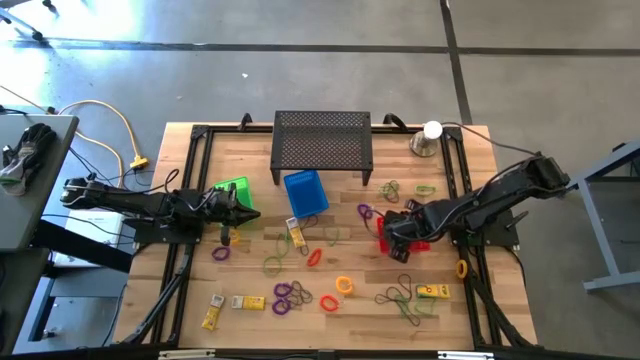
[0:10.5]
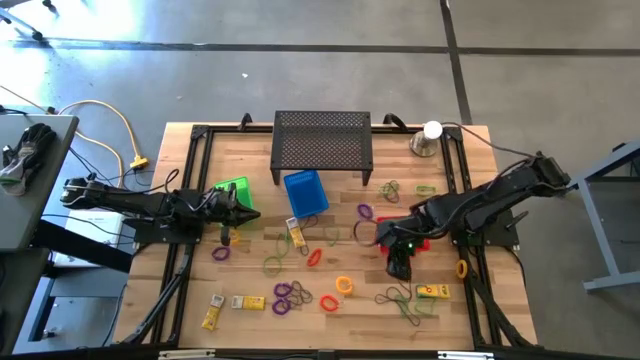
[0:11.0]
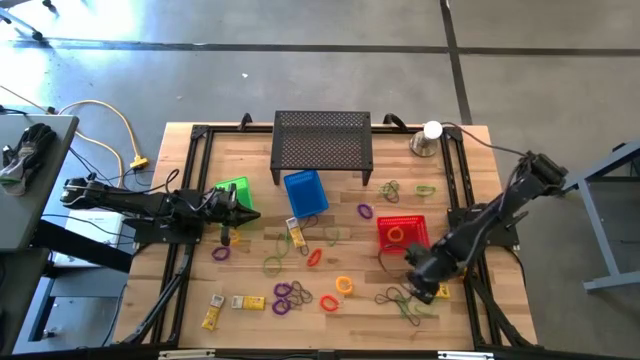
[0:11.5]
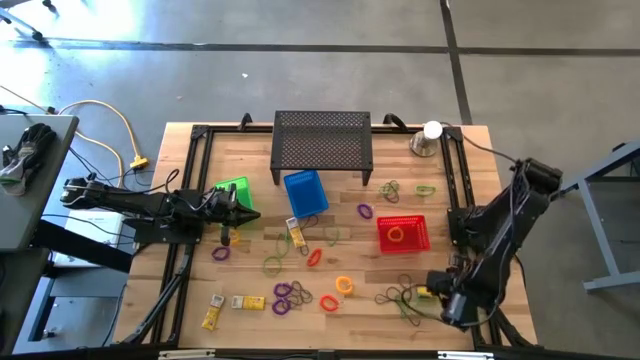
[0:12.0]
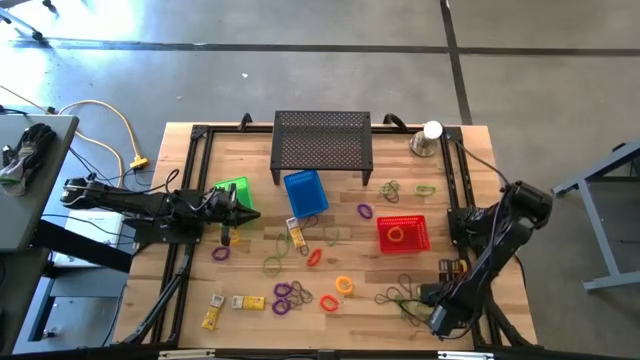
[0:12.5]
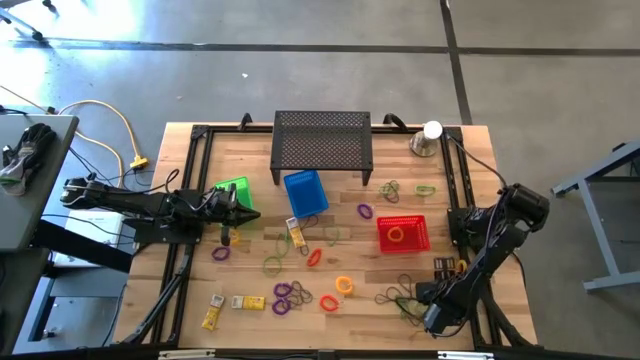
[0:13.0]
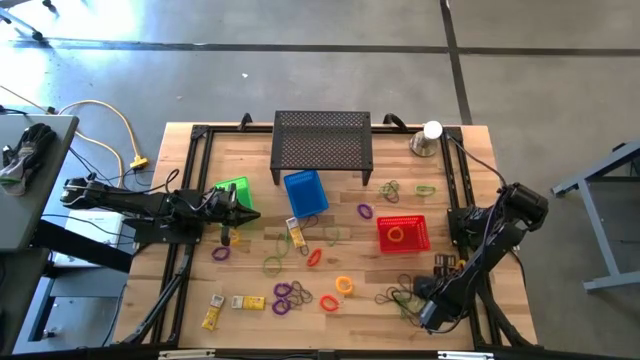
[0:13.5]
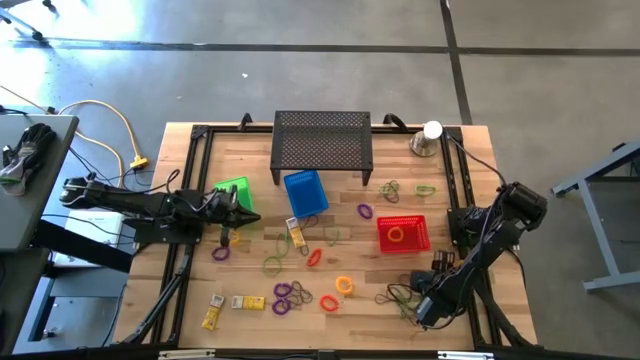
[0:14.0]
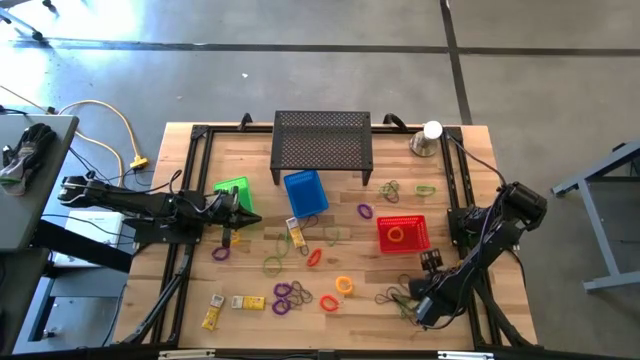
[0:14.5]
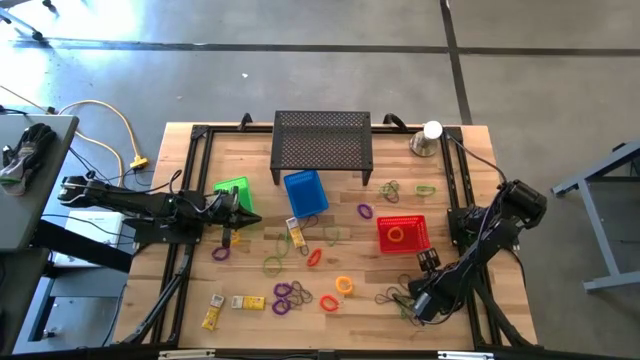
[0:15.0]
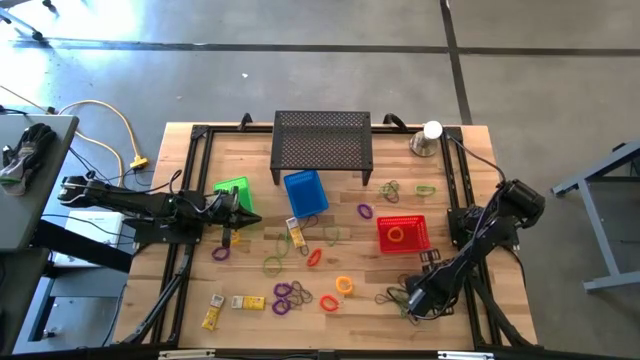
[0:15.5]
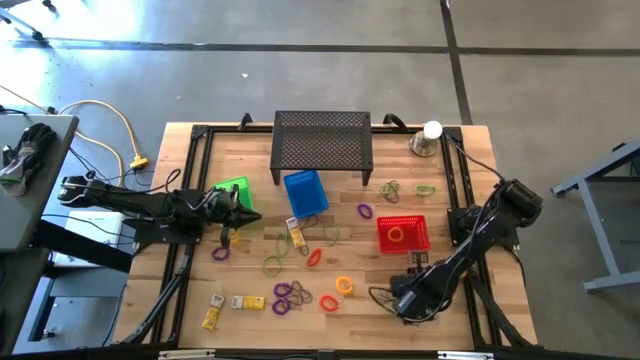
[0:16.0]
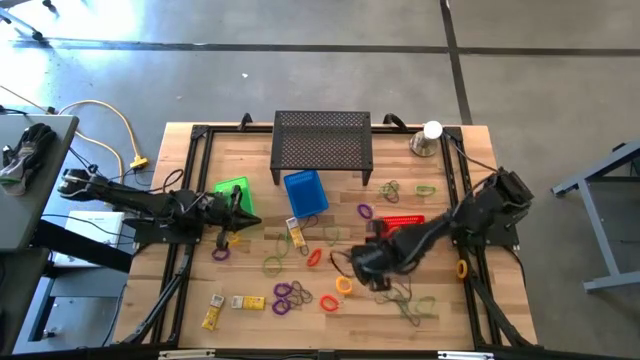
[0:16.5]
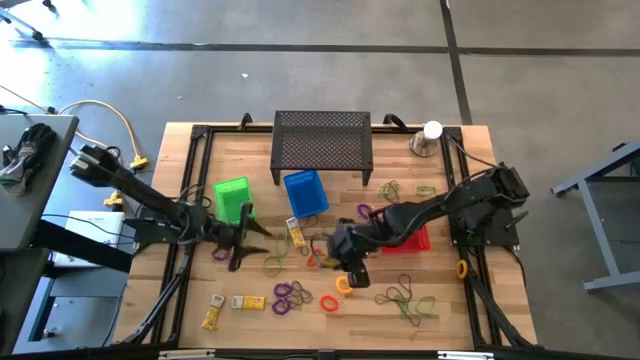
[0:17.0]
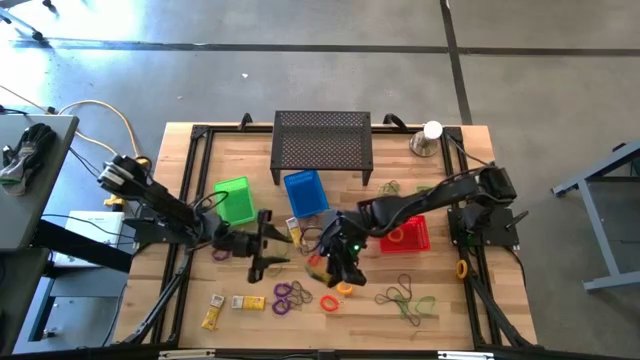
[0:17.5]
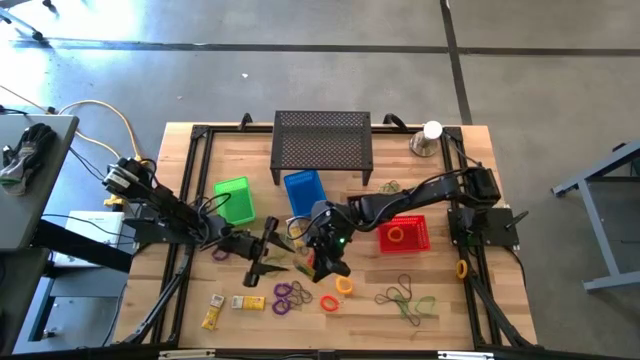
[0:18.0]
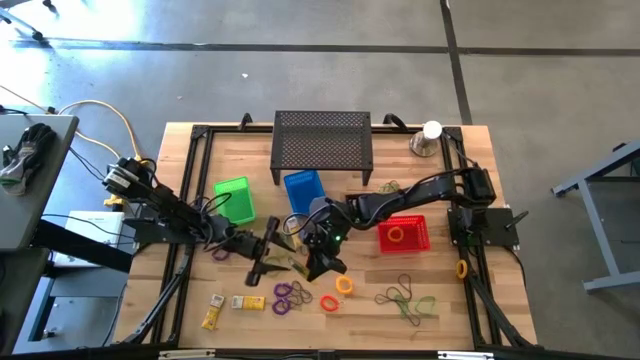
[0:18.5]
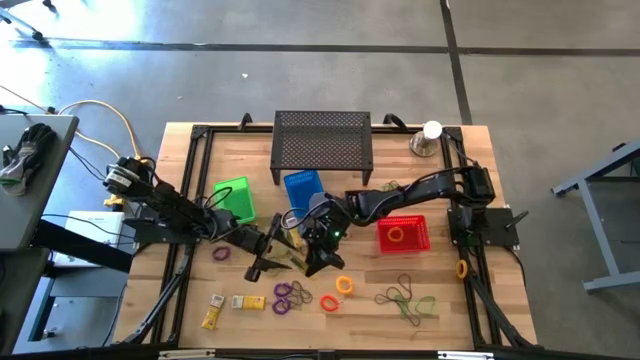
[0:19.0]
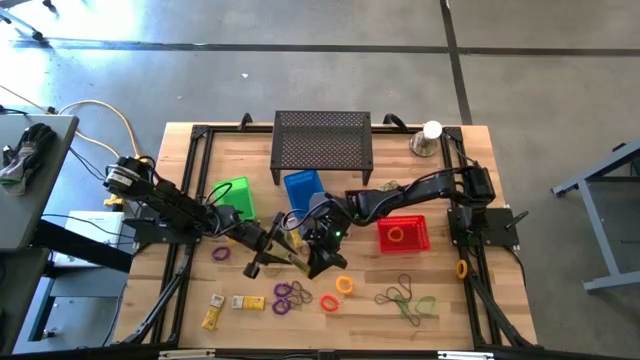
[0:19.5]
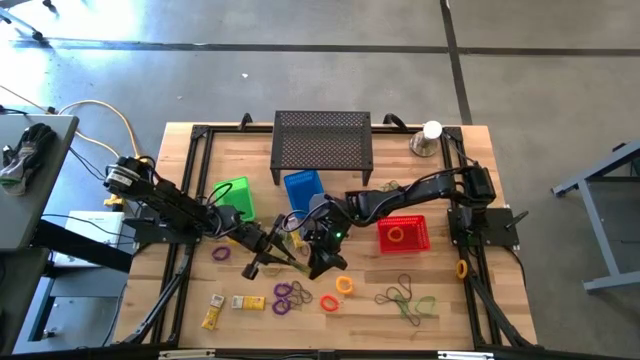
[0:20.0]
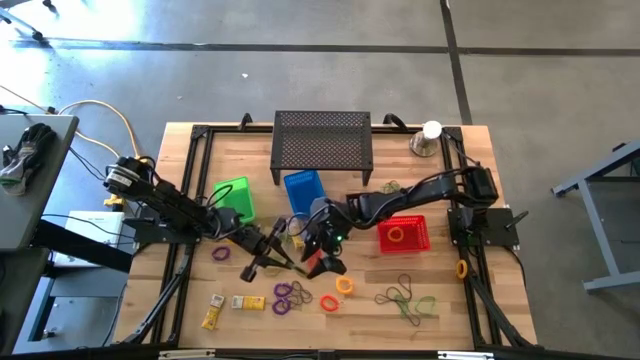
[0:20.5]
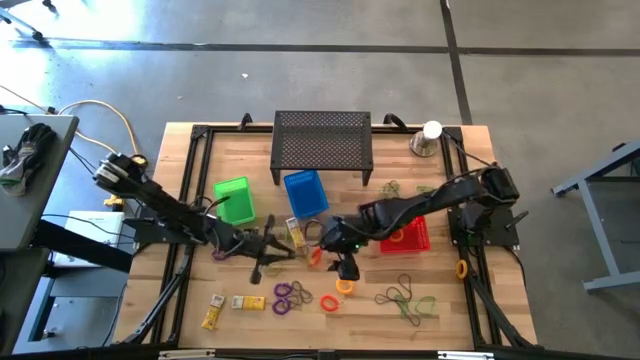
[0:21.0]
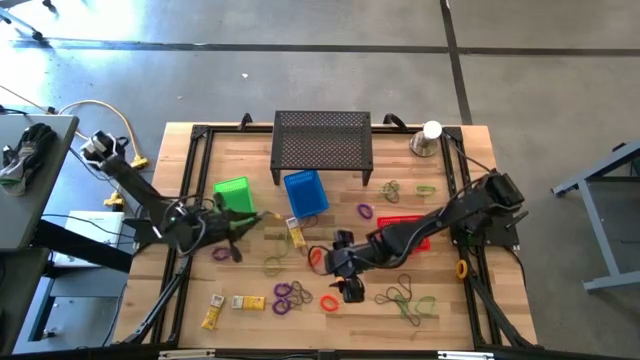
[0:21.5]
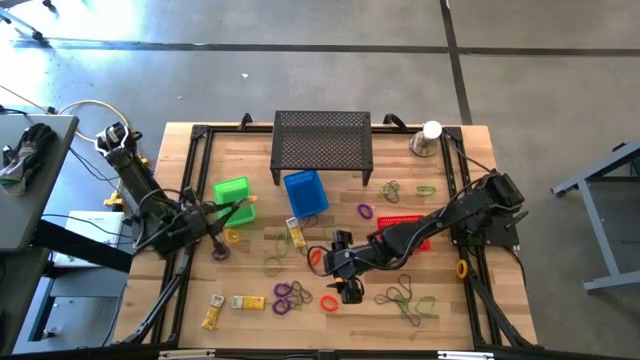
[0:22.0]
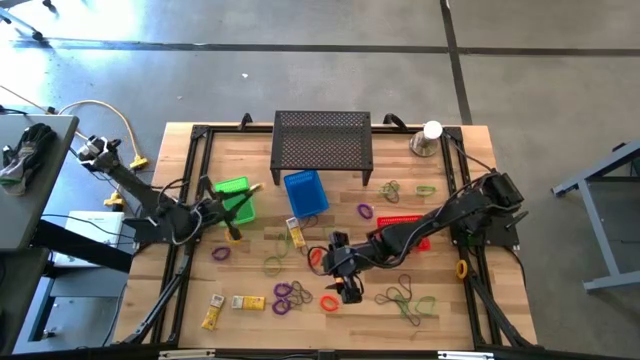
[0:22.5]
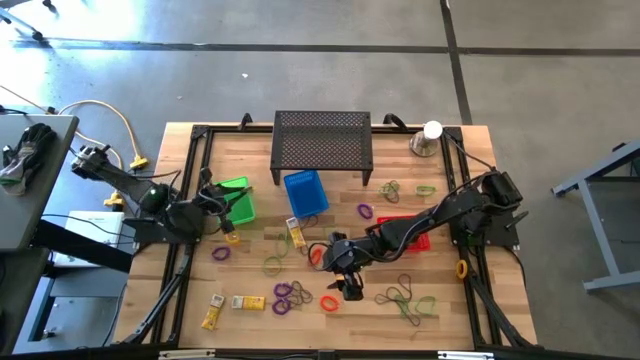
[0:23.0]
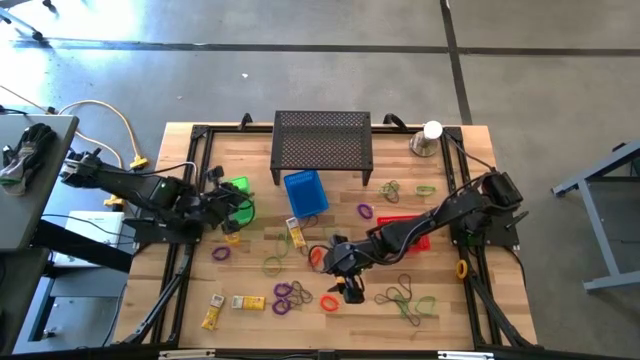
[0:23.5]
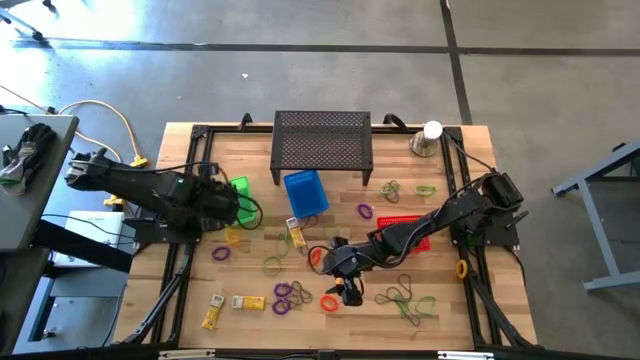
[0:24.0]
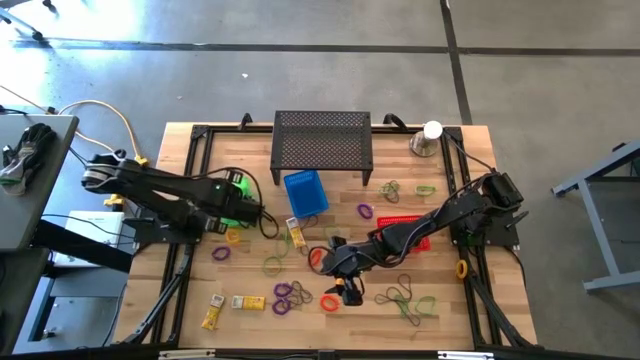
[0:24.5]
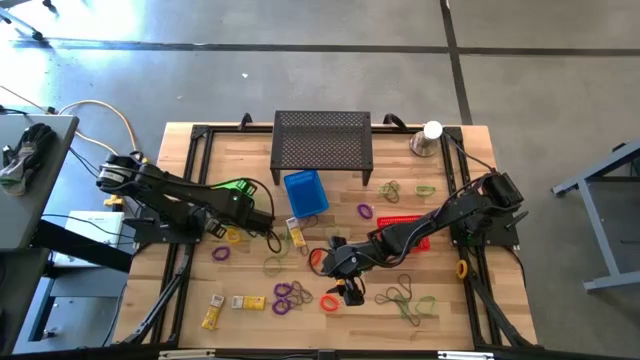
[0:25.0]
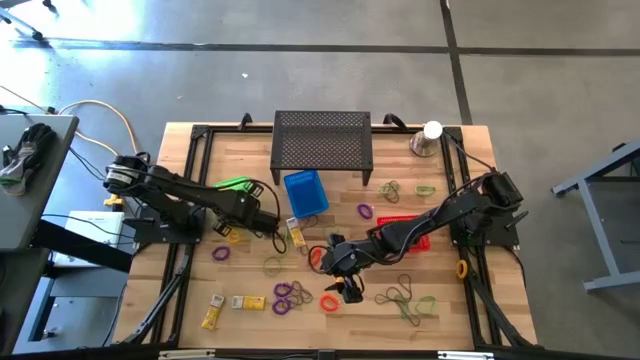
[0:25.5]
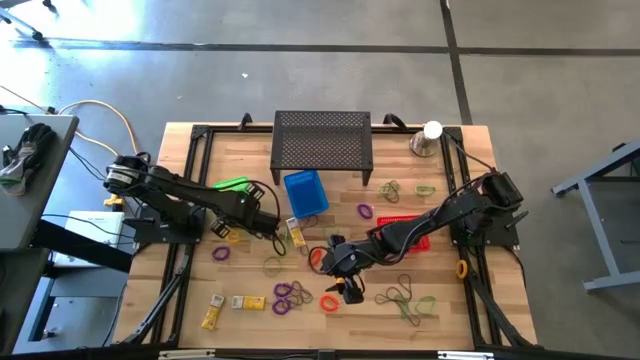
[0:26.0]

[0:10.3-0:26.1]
Task: Pick & Place Office Desk Supplies
Put the yellow crayon box into the green basket

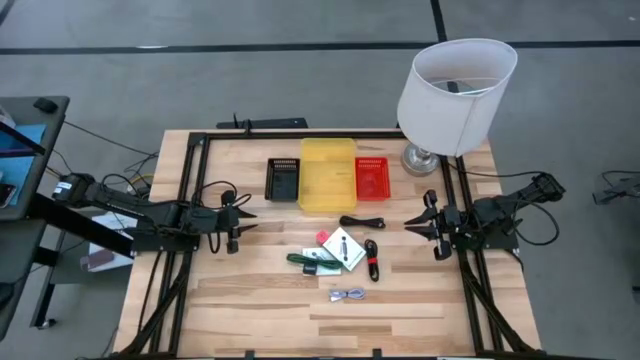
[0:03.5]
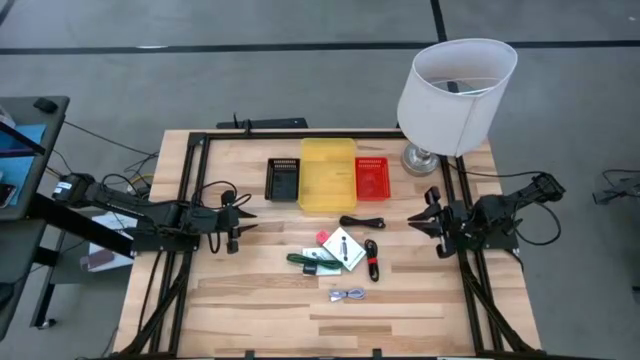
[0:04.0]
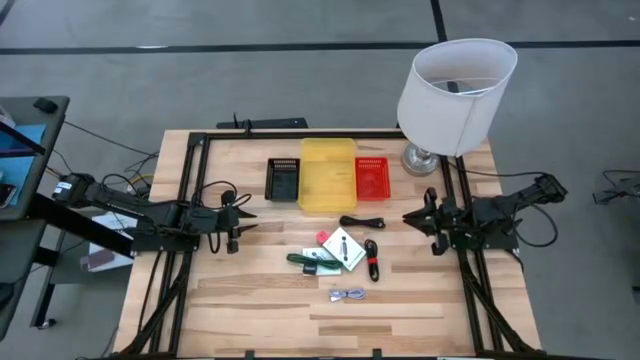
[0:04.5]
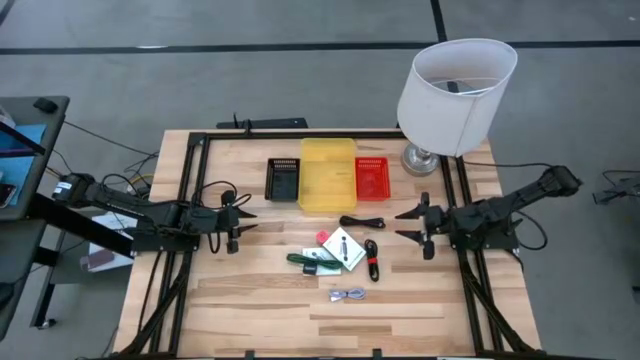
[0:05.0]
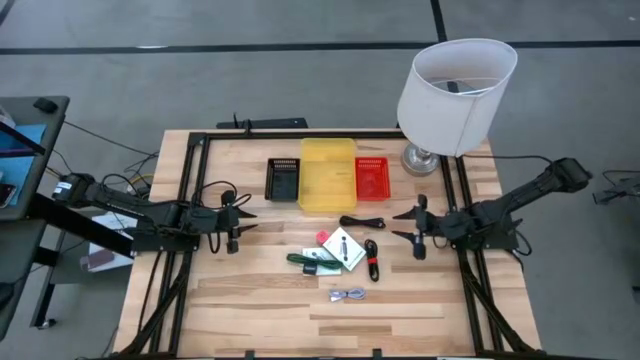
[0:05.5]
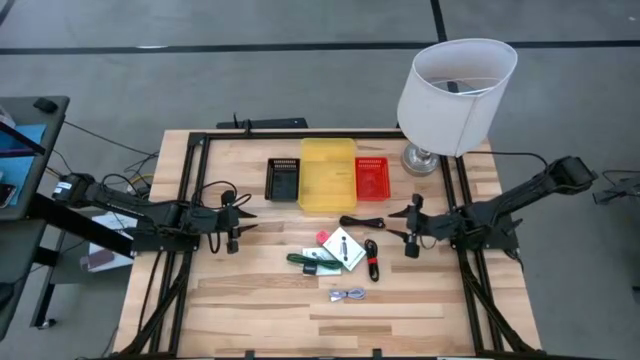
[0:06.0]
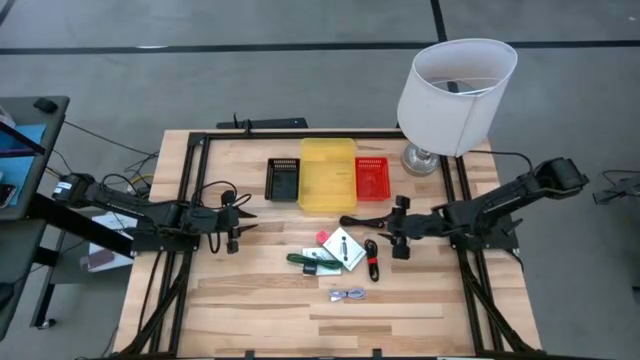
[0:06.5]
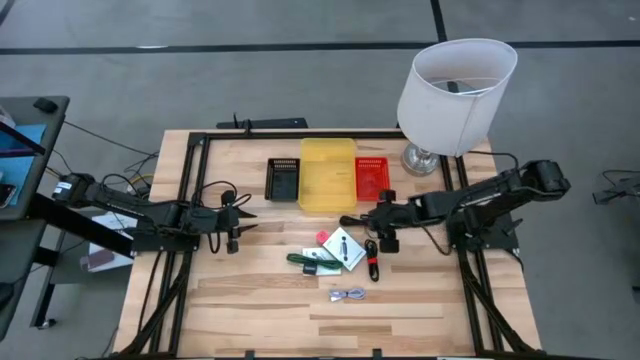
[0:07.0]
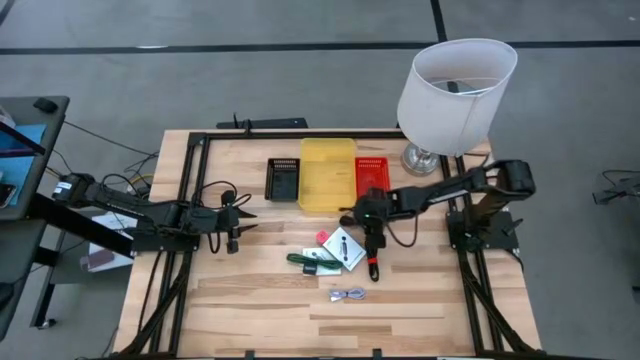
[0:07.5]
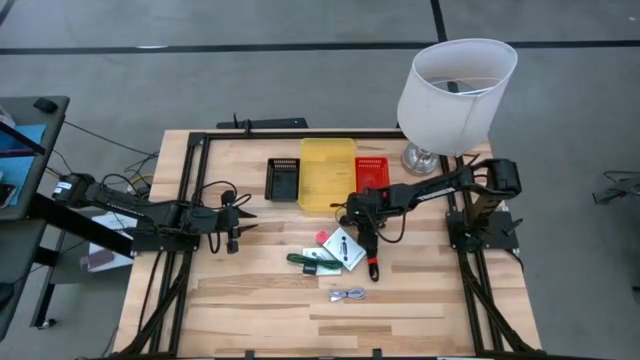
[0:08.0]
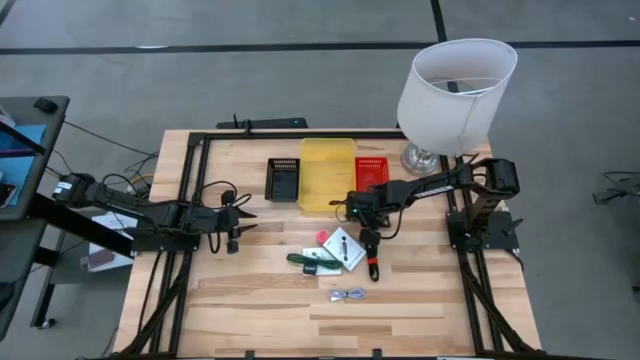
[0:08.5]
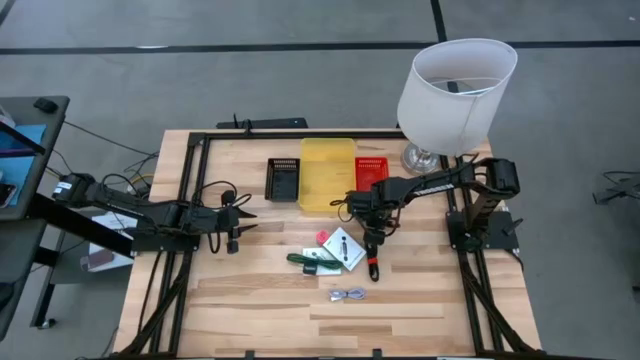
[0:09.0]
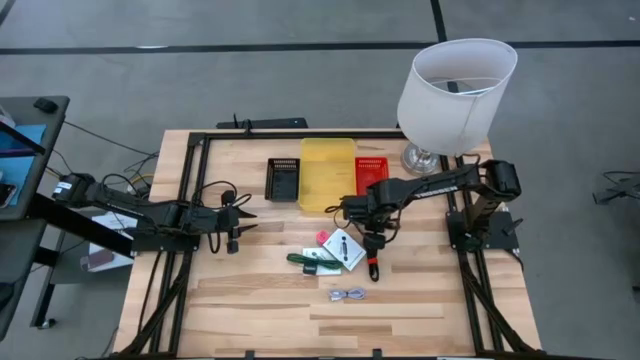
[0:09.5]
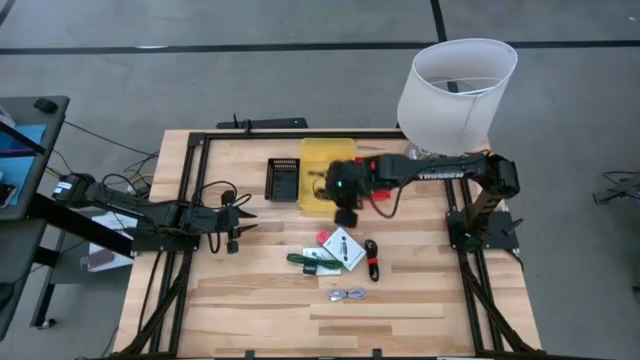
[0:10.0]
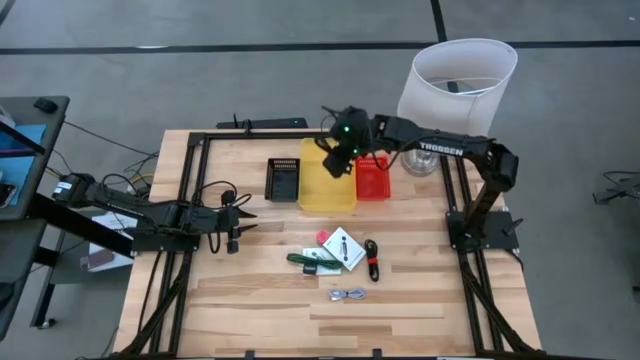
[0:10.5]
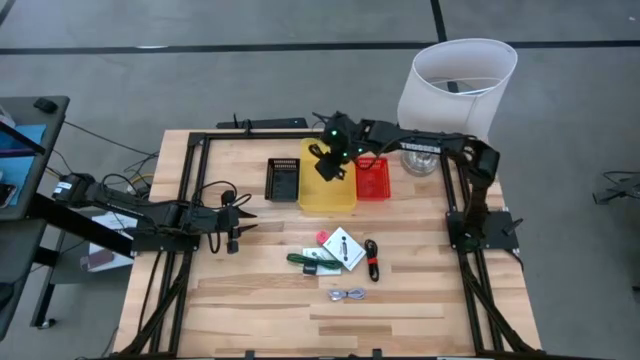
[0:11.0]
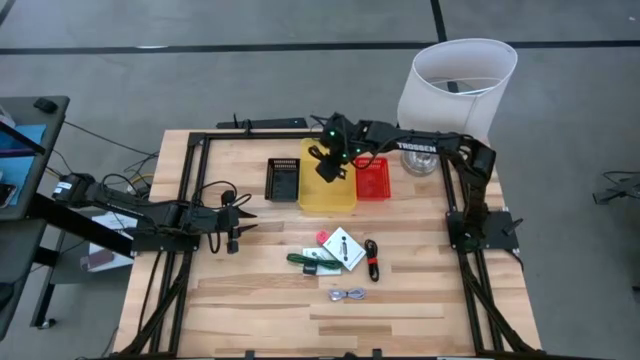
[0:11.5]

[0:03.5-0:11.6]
Task: Pick and place items into bin
Put the top black charger cable into the yellow bin
